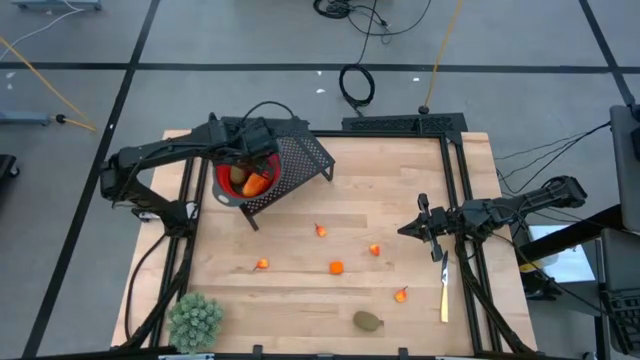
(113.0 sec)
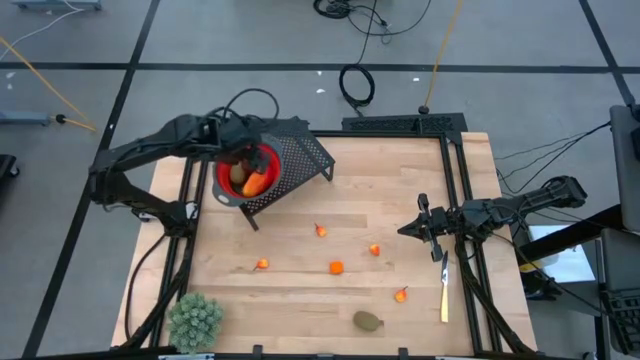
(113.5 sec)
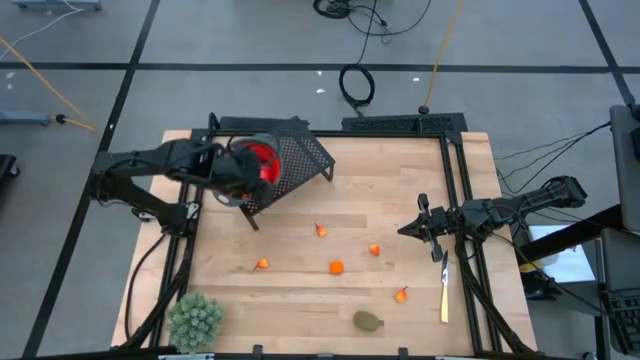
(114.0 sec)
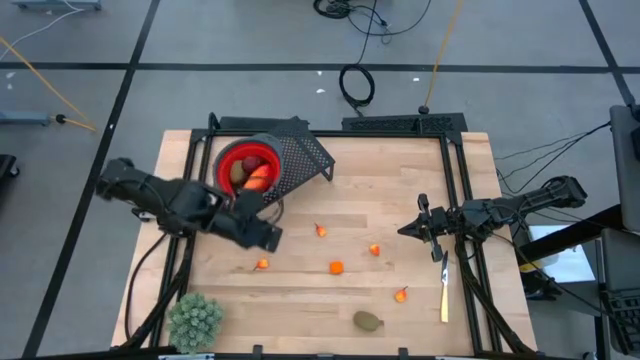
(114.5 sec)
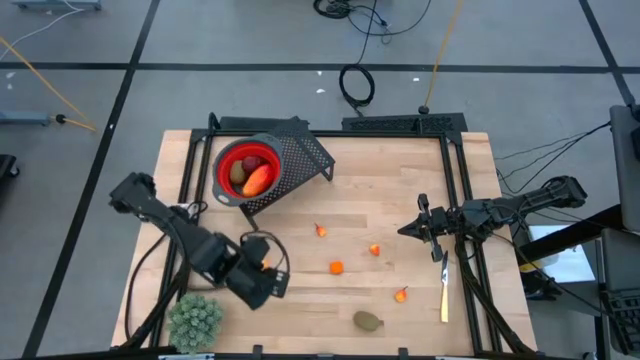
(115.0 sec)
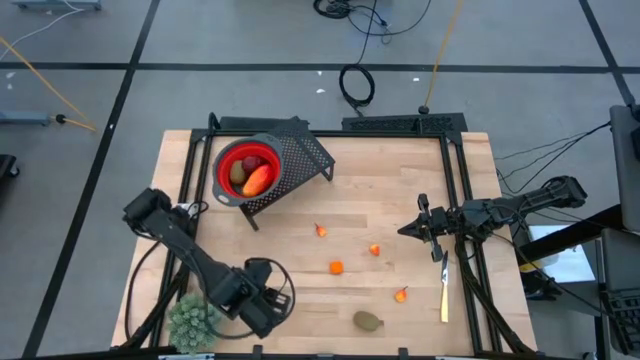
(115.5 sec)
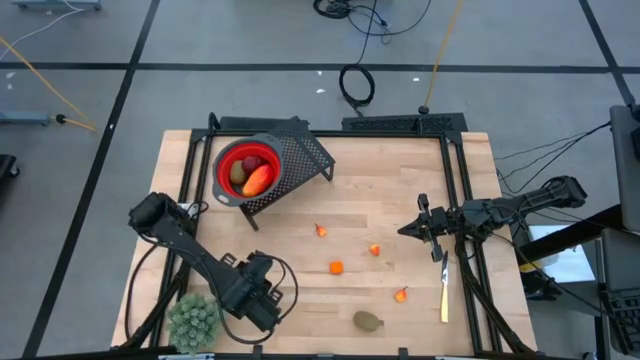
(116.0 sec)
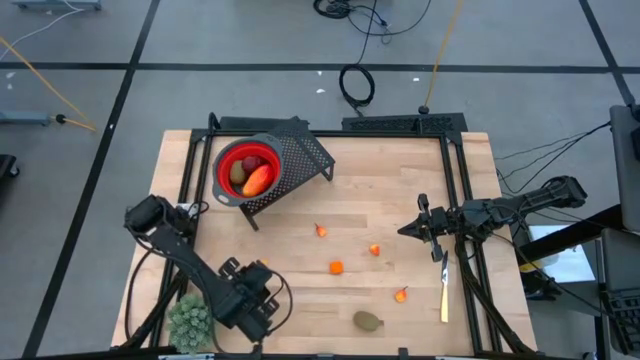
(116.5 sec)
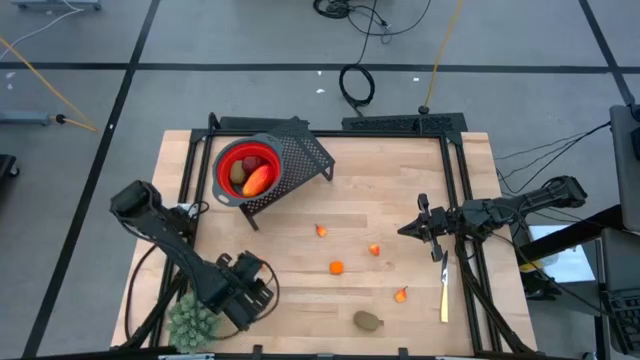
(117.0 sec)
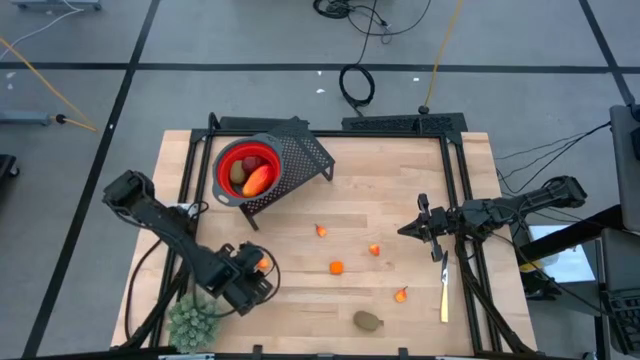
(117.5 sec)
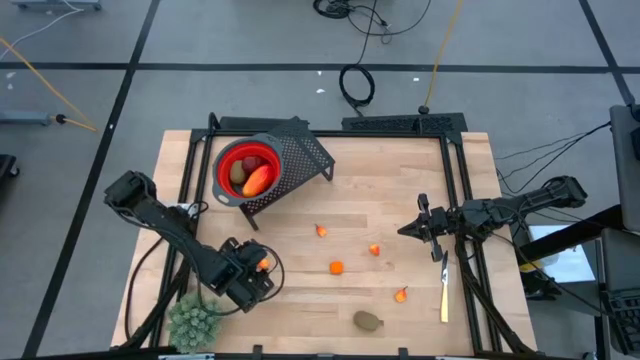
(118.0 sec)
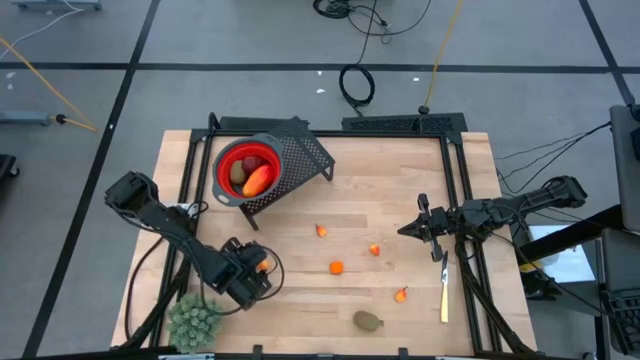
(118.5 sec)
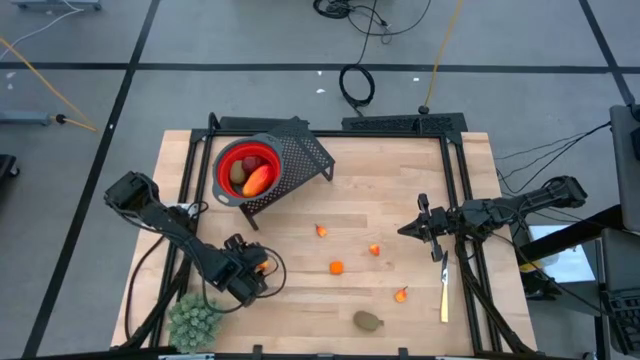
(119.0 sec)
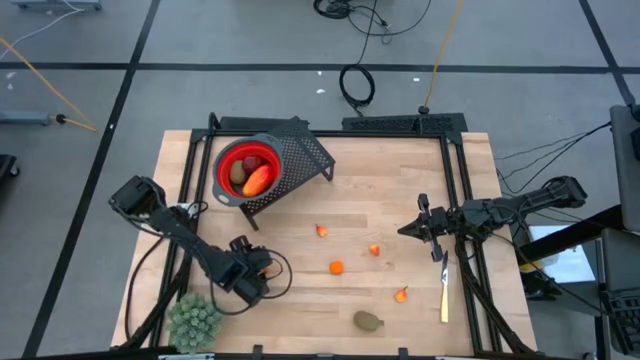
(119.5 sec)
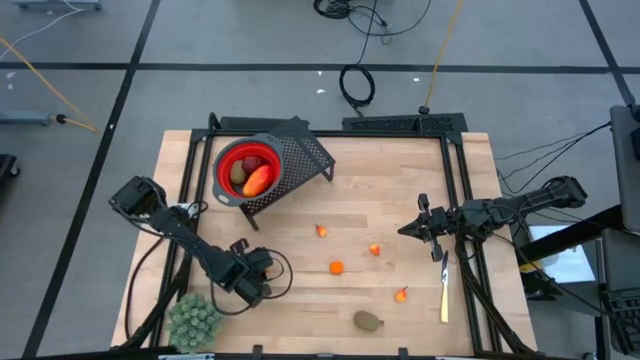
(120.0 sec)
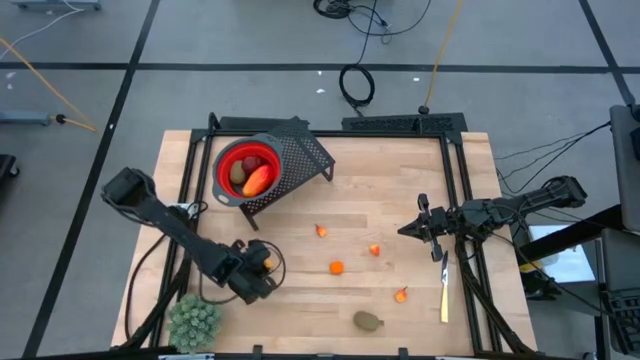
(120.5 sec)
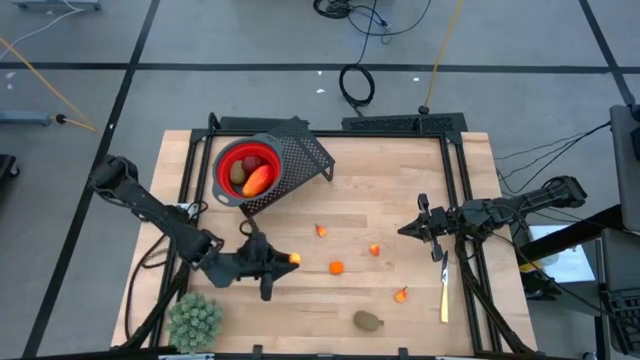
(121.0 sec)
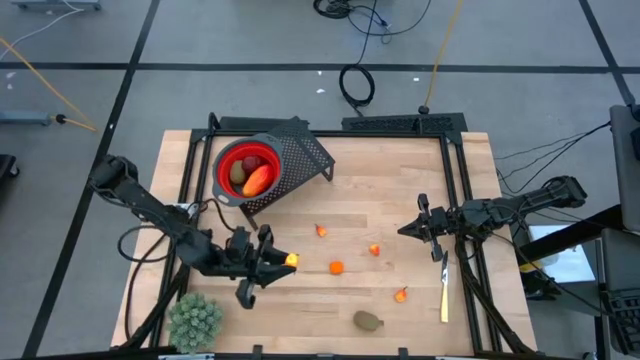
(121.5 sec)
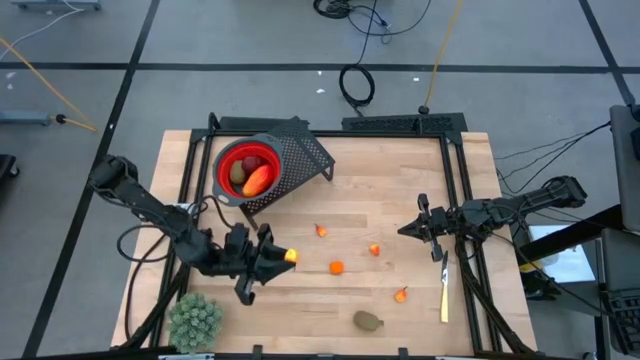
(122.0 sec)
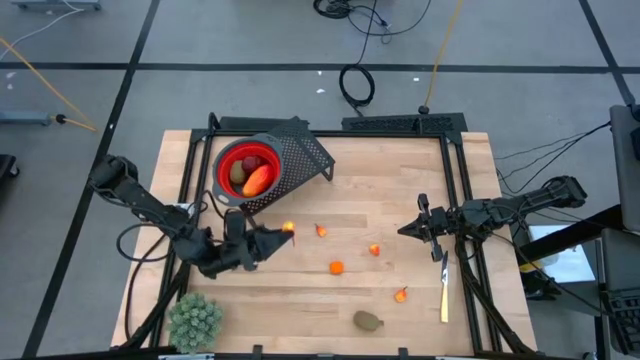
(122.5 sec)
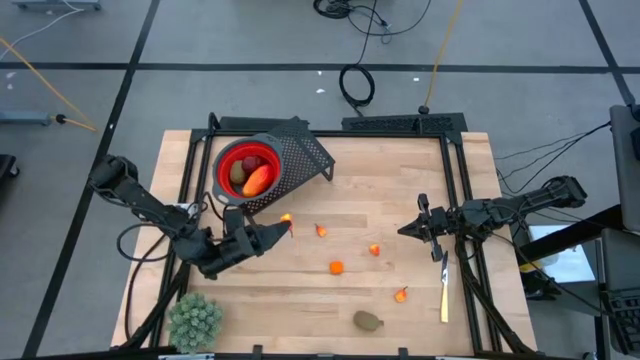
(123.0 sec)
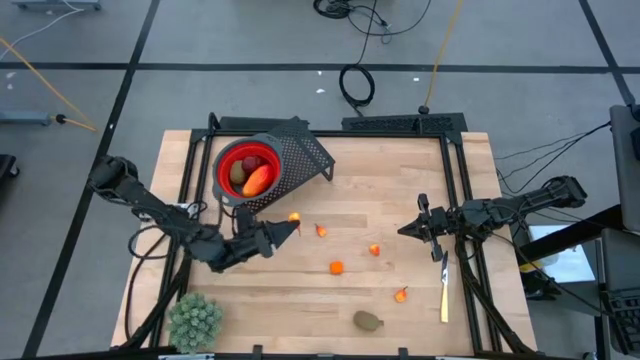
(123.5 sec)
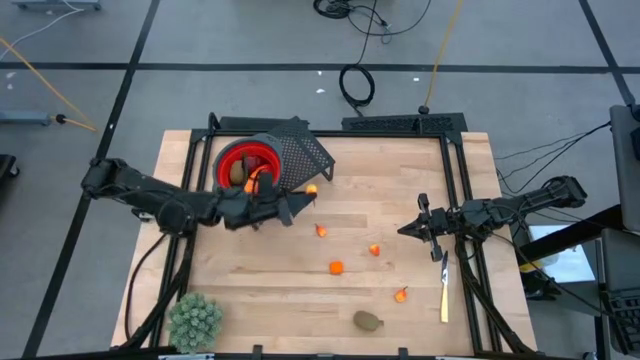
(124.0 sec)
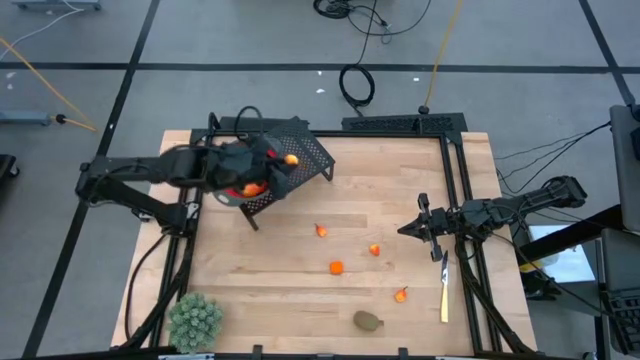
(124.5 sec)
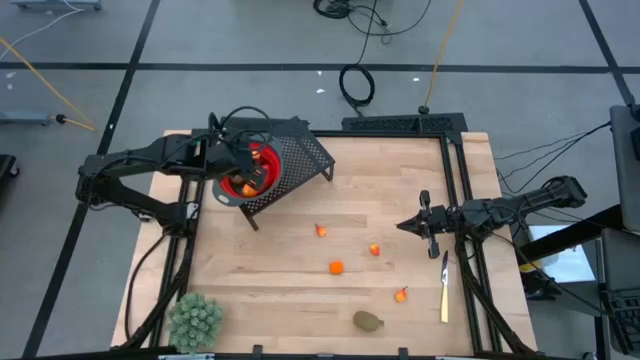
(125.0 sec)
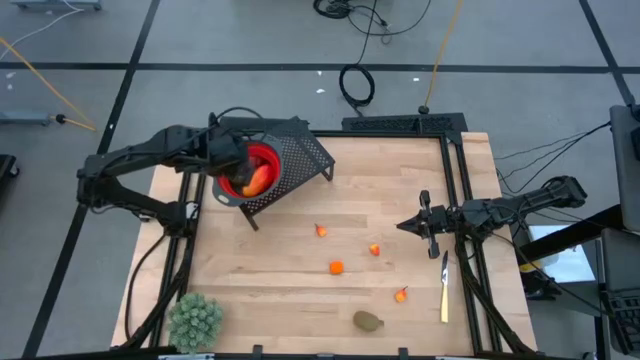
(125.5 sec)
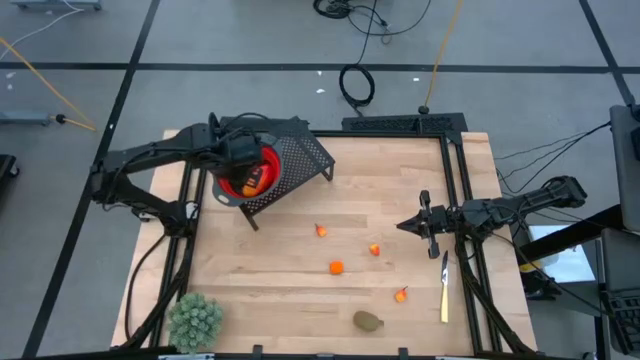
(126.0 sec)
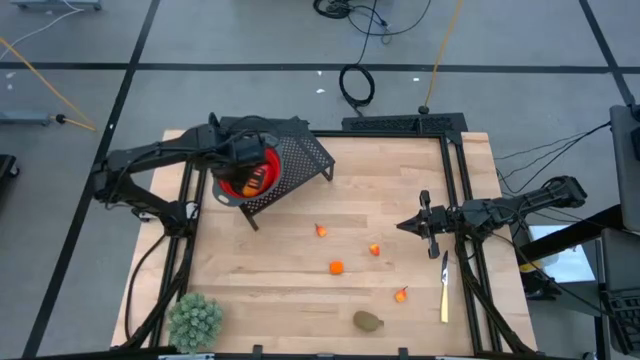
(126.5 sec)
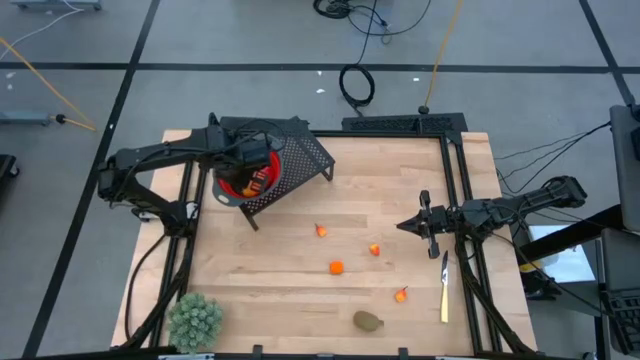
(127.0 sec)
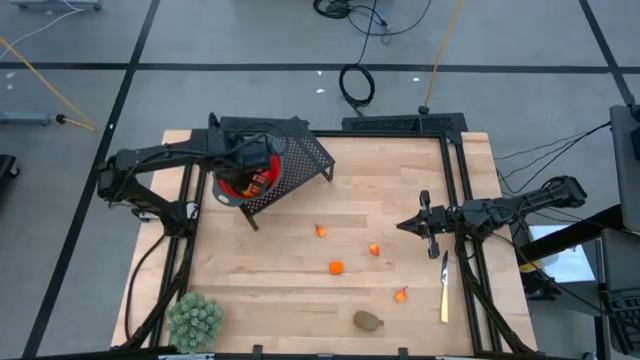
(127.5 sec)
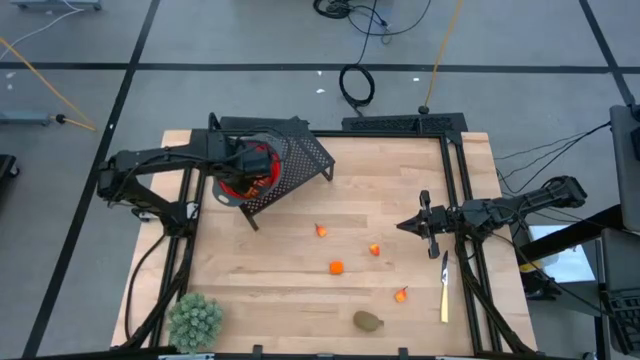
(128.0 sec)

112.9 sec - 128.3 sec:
Task: Pick & Place Fruit
Put the peach into the red strainer bowl on the shelf

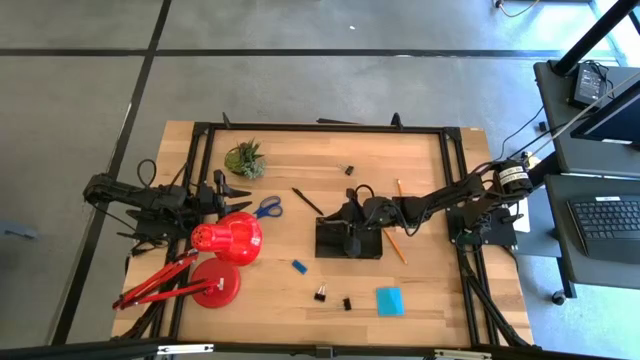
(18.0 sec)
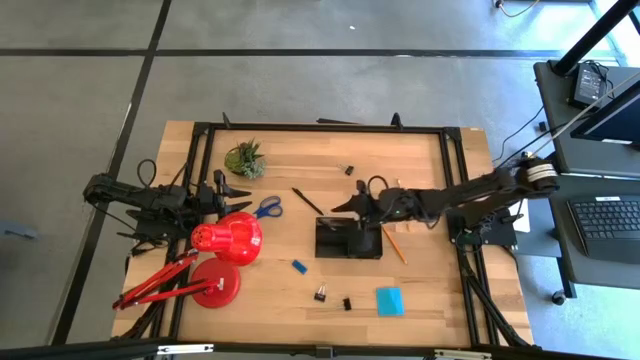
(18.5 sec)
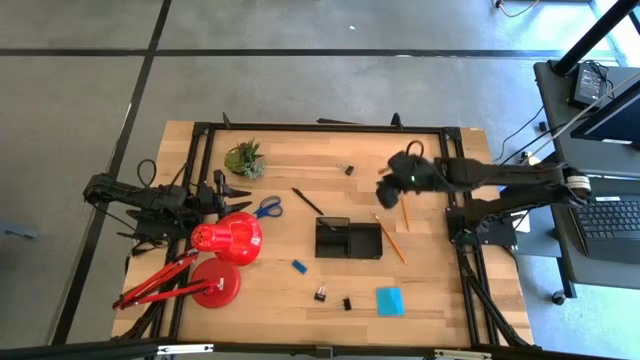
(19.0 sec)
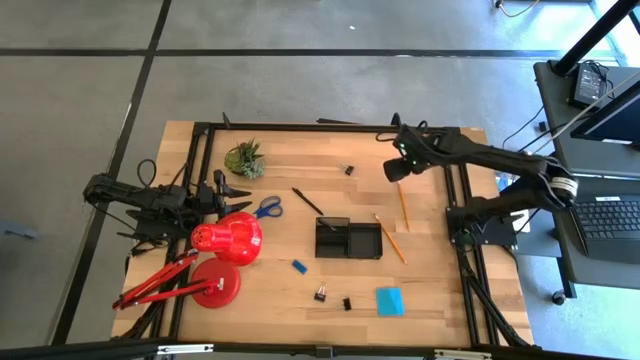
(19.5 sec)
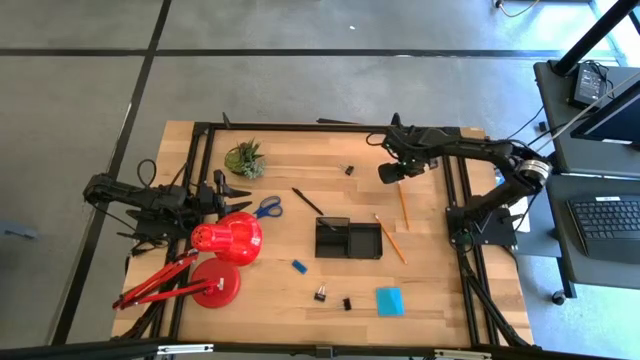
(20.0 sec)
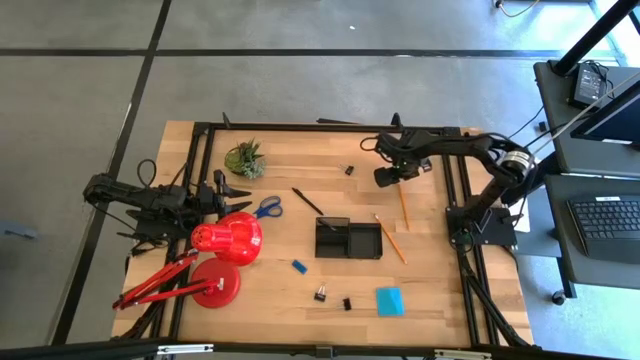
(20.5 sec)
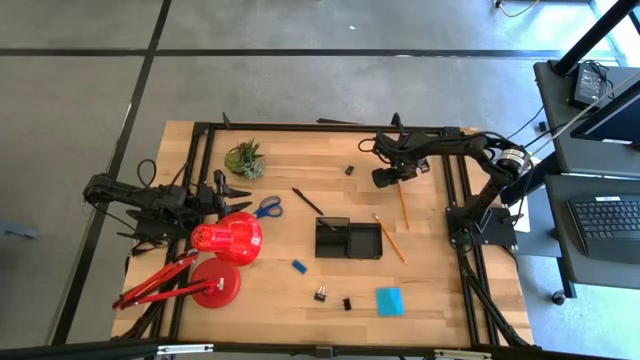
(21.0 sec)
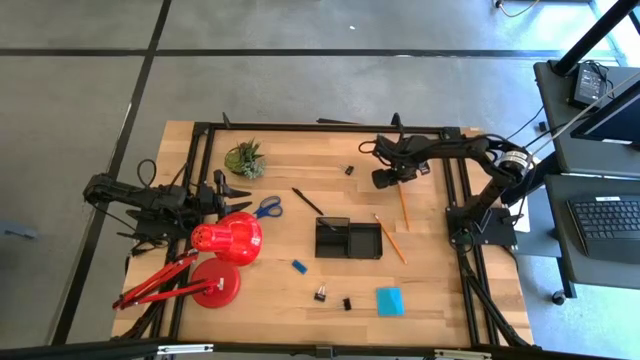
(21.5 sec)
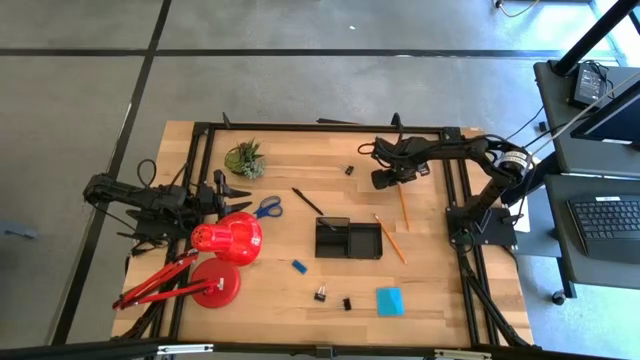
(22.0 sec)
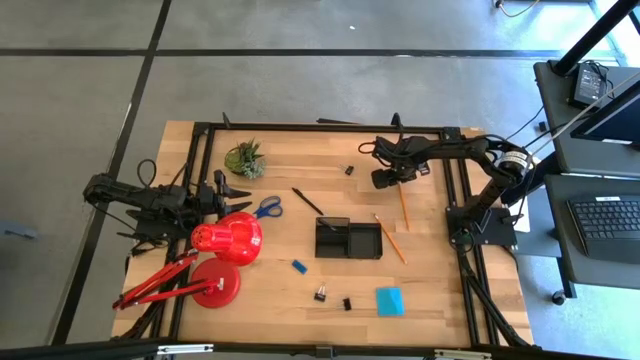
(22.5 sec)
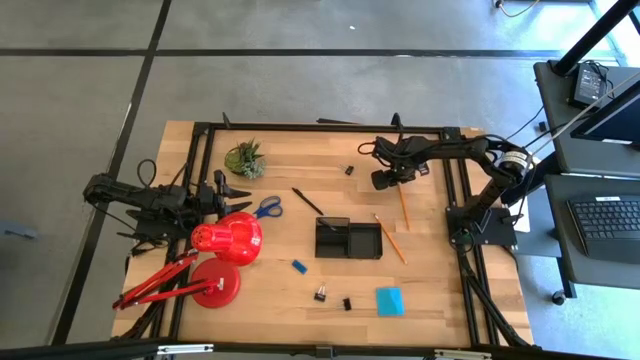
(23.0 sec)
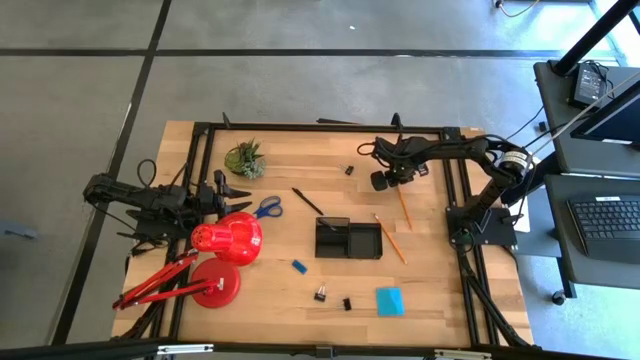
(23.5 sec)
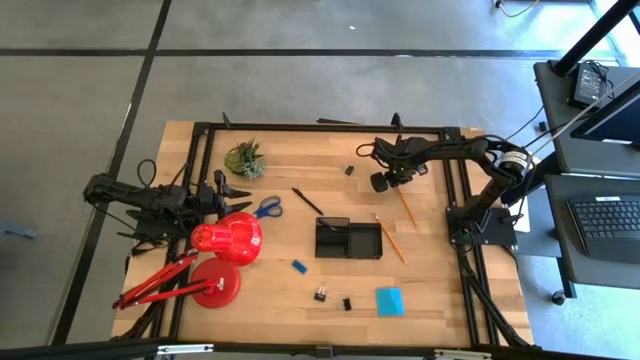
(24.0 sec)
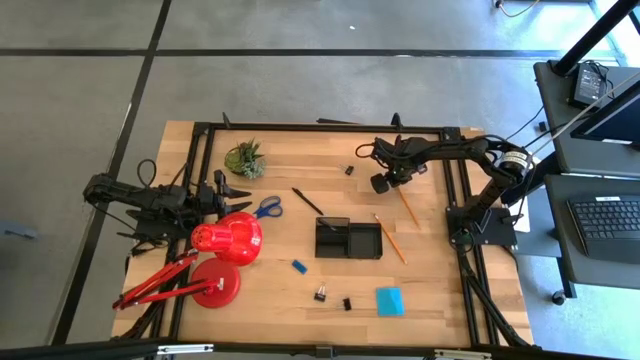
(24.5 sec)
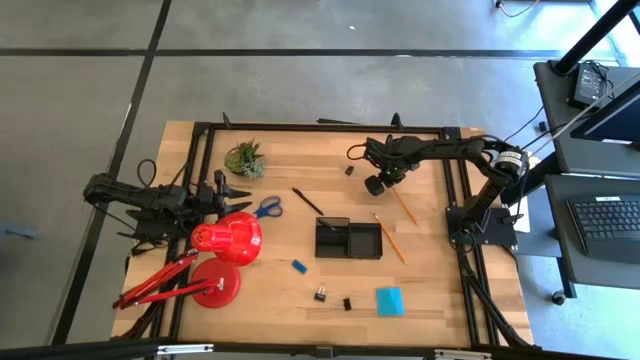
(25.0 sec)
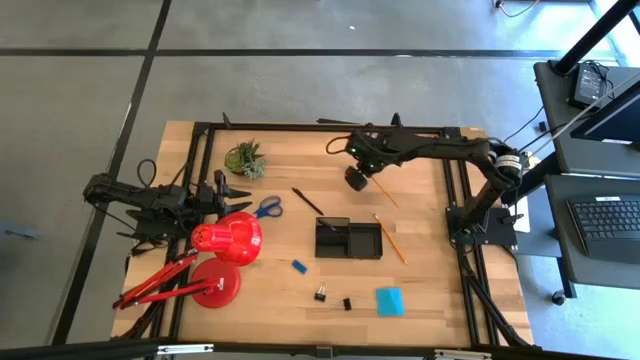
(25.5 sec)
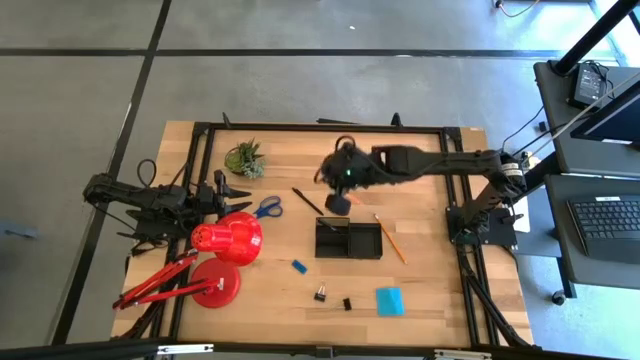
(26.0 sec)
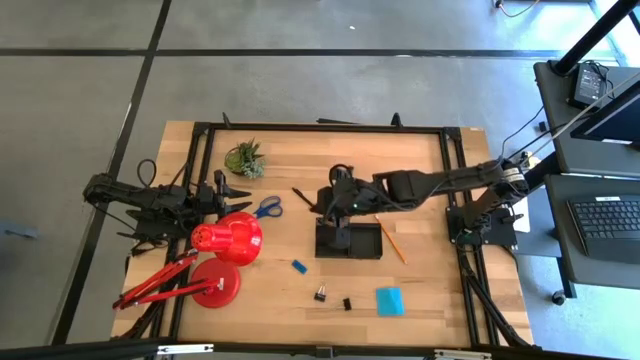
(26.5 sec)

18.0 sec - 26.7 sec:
Task: Pick and place office supplies into organizer
Put the top orange pencil into the black desk organizer
